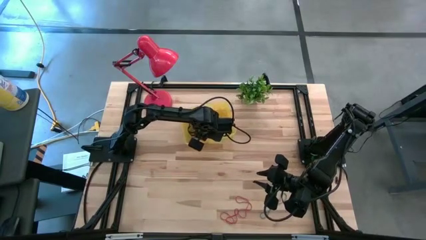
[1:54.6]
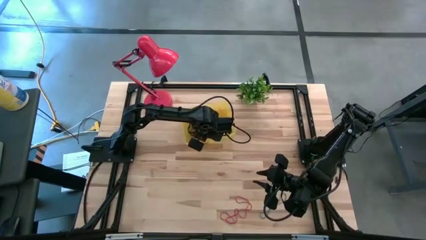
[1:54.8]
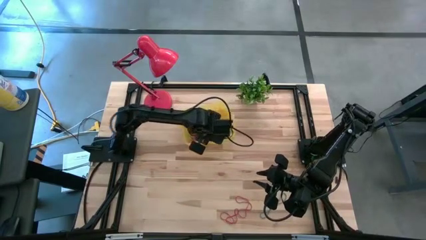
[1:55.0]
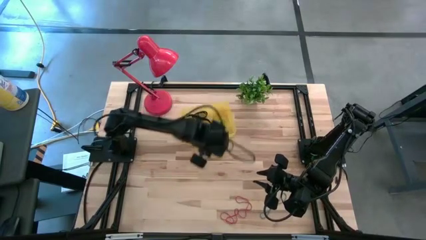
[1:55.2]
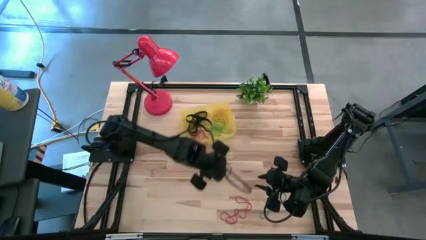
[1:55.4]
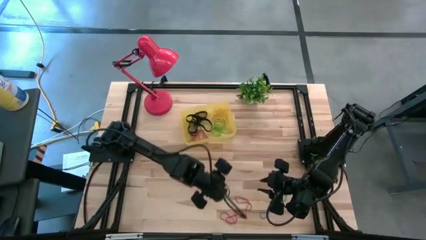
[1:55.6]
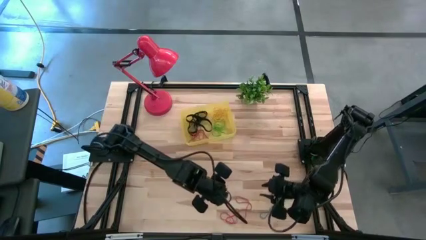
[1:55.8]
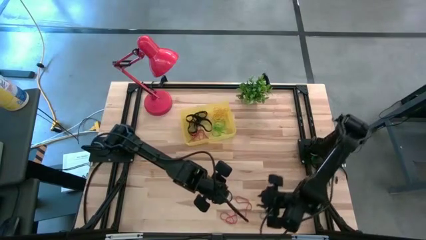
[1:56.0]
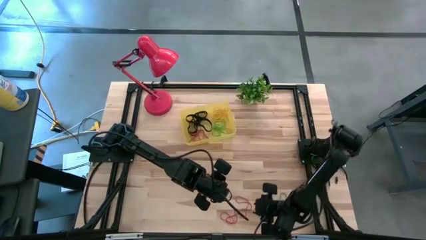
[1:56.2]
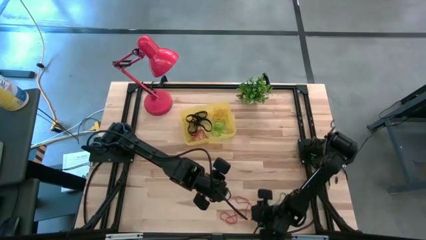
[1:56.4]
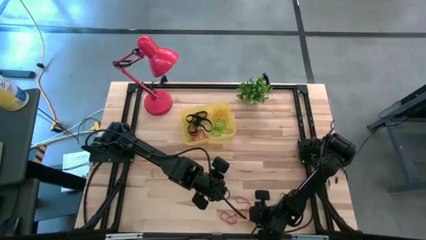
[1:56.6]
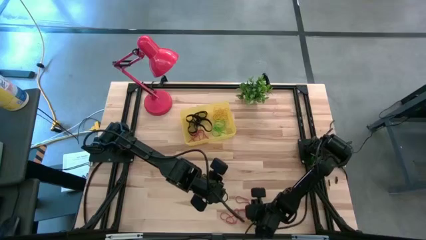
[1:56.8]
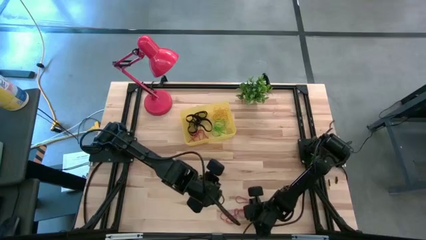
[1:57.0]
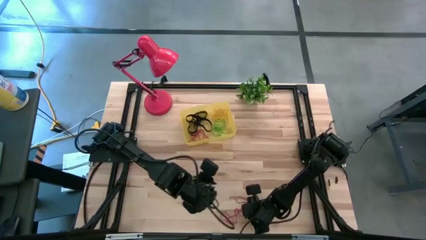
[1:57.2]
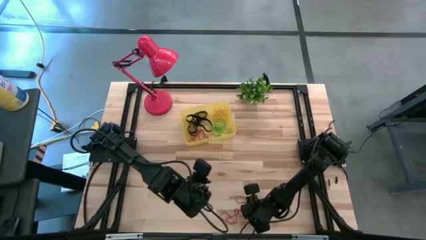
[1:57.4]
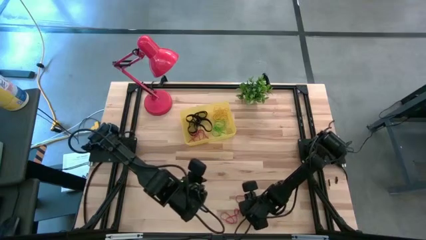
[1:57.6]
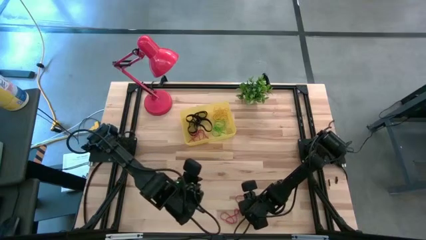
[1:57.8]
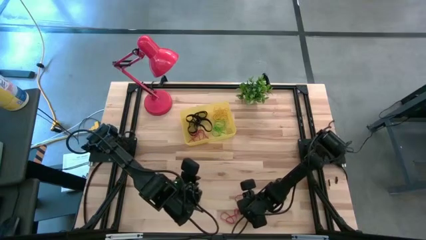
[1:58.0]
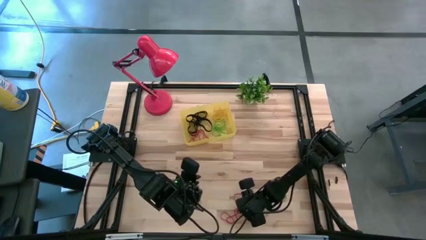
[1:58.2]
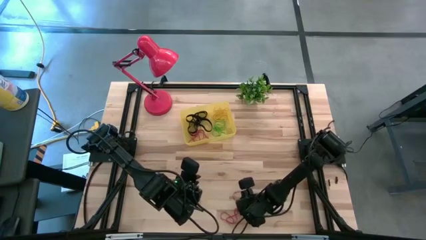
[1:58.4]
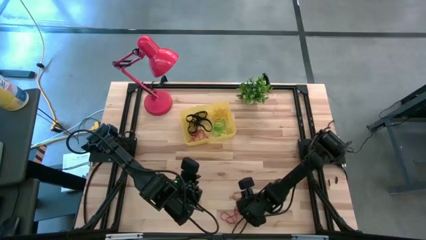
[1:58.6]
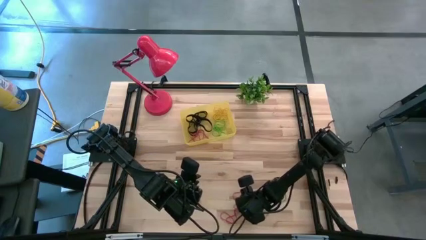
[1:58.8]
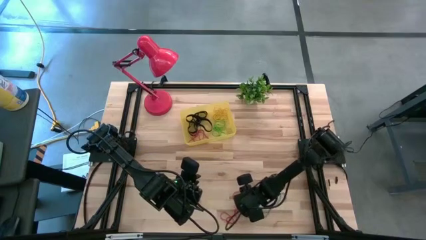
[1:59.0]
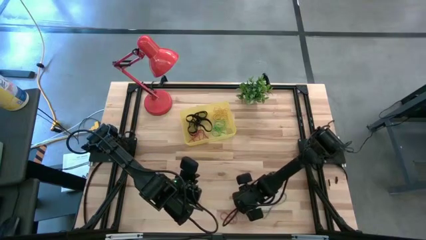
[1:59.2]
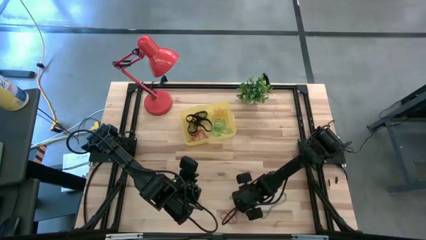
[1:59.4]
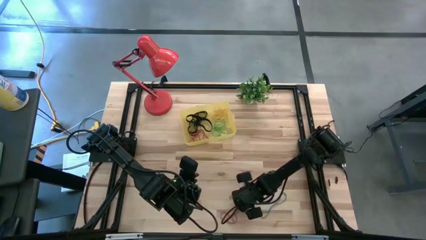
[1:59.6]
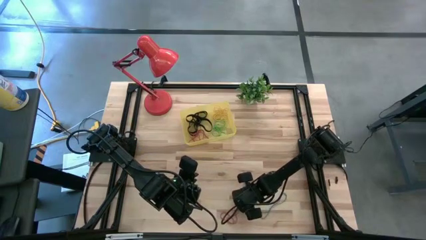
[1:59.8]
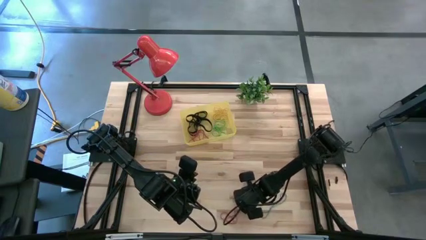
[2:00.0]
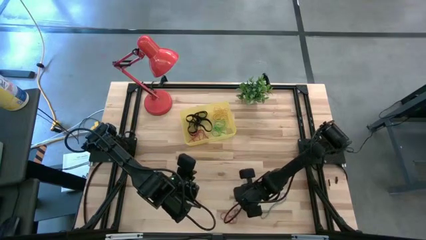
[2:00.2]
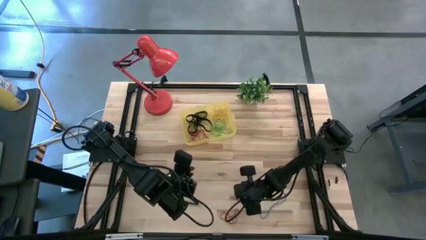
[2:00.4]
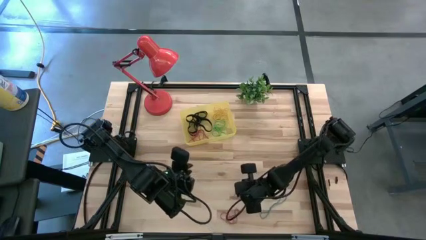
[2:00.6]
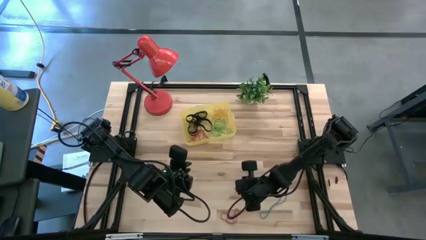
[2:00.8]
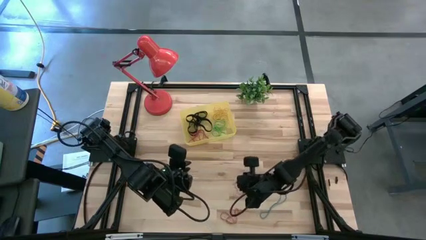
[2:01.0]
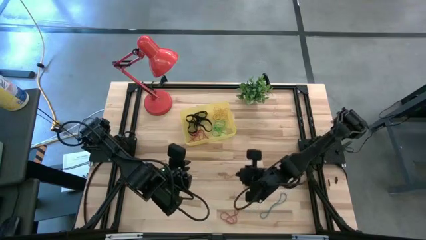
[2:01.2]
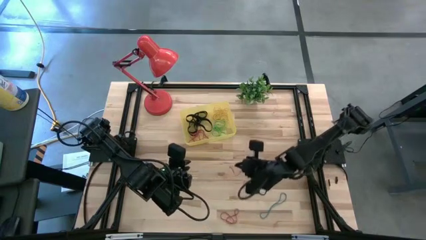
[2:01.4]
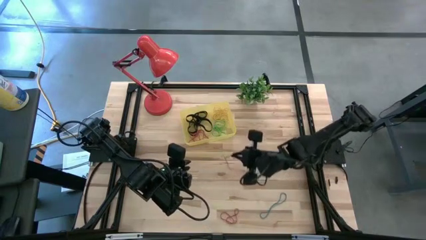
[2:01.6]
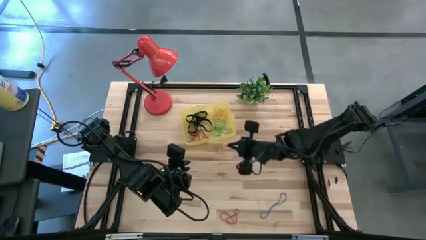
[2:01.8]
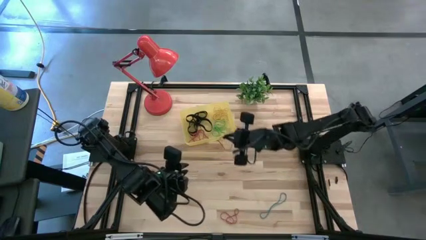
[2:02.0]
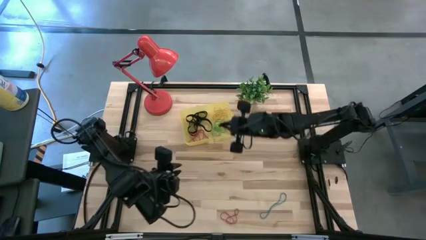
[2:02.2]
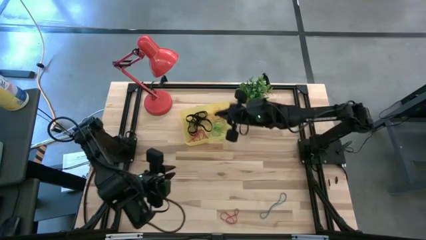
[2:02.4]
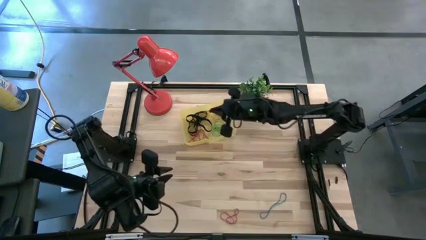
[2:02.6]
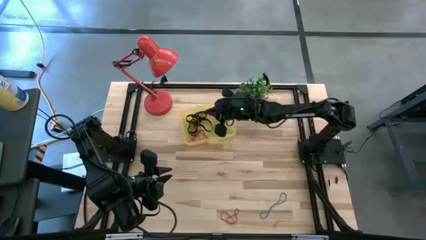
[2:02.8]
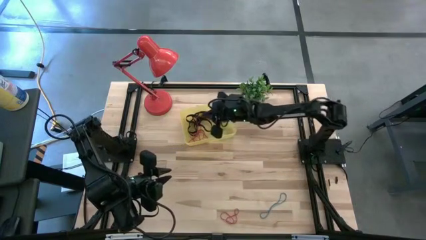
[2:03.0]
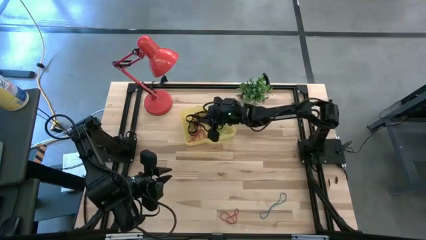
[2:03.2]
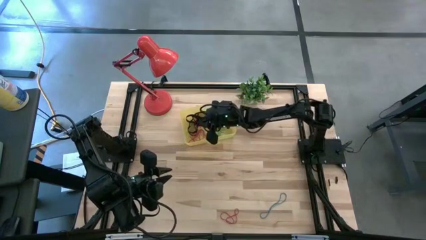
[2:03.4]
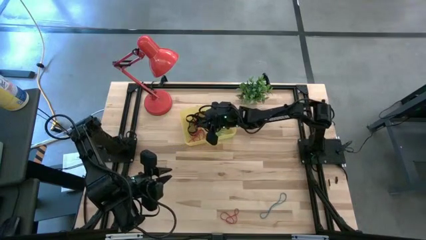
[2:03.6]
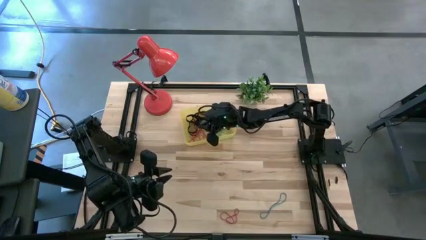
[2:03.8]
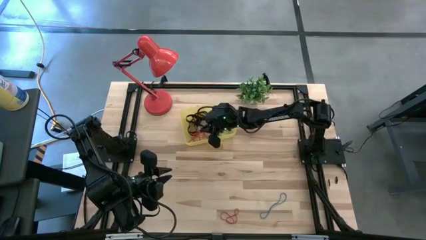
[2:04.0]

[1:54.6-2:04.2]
Task: Pick and place rubber bands into bin
Put the red rubber band into the yellow bin

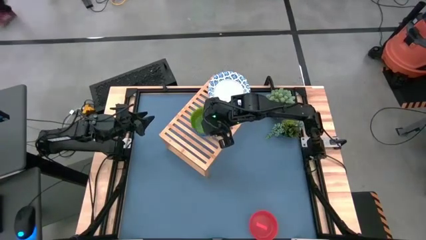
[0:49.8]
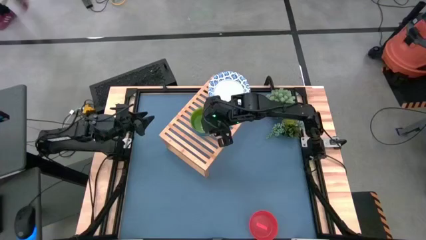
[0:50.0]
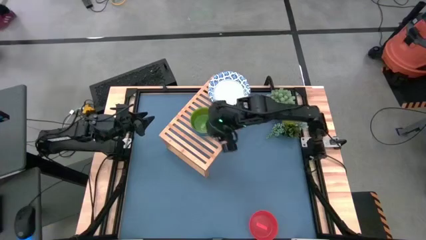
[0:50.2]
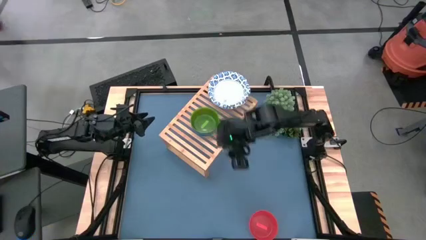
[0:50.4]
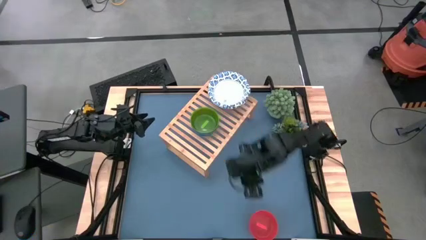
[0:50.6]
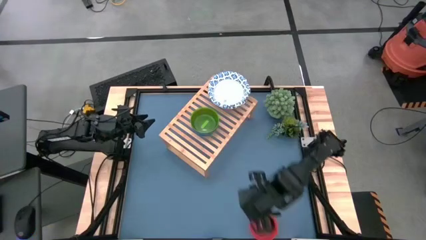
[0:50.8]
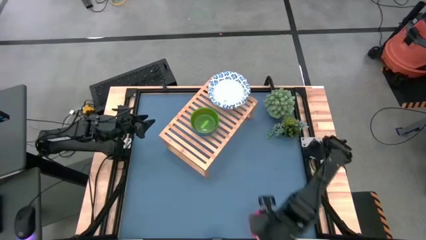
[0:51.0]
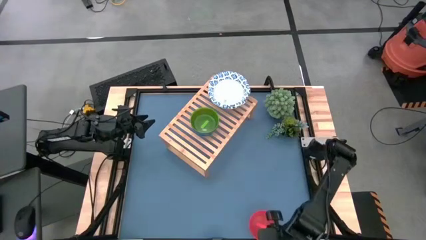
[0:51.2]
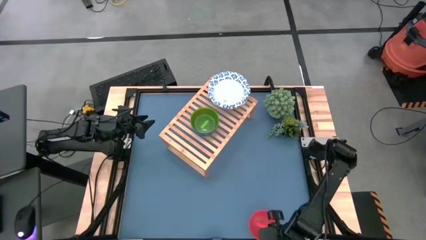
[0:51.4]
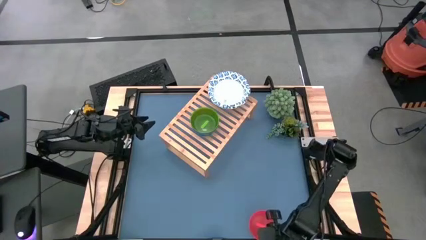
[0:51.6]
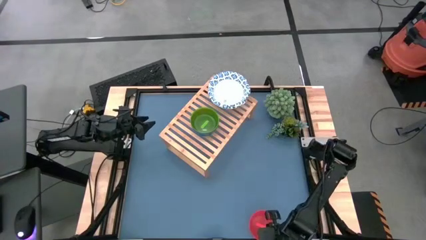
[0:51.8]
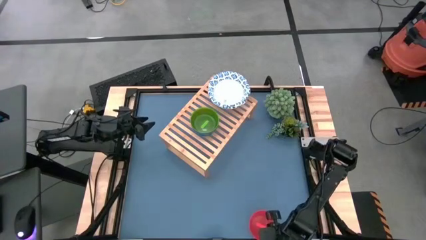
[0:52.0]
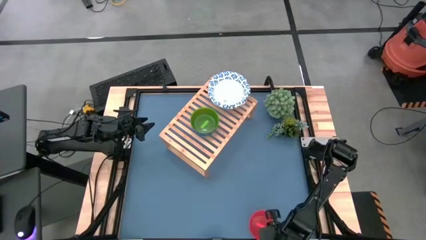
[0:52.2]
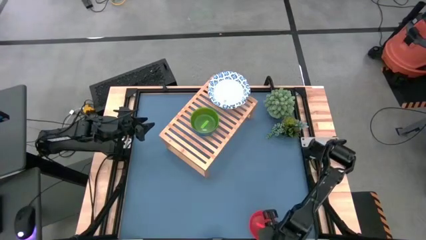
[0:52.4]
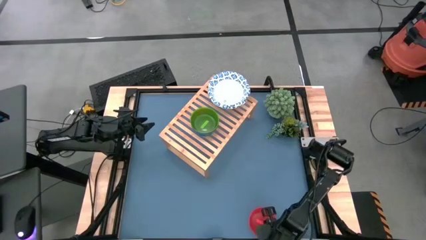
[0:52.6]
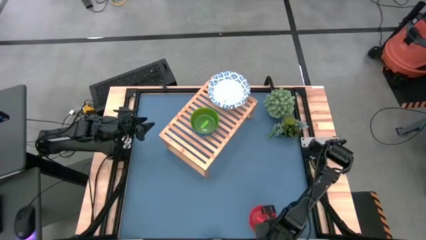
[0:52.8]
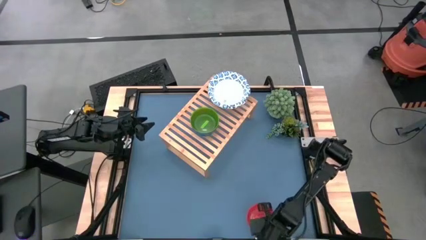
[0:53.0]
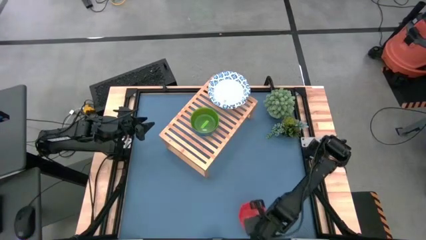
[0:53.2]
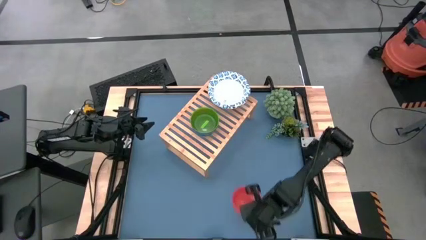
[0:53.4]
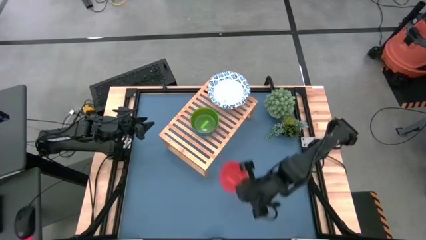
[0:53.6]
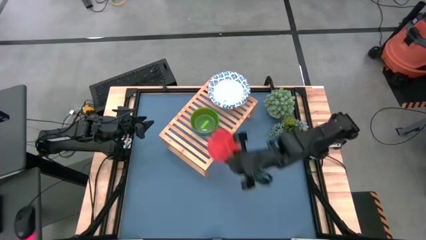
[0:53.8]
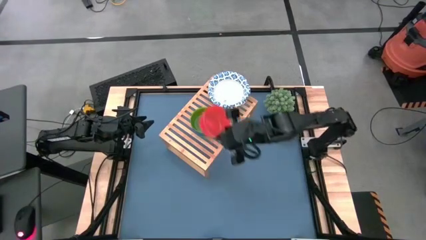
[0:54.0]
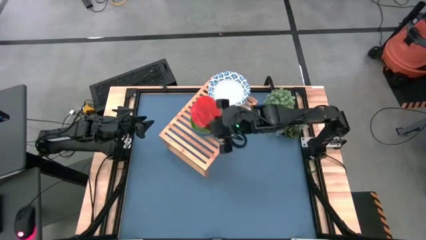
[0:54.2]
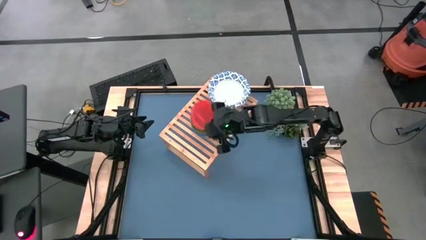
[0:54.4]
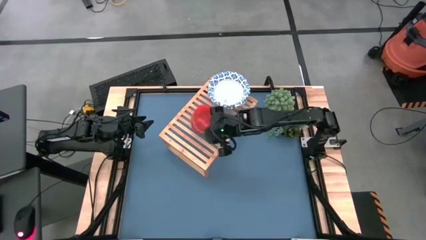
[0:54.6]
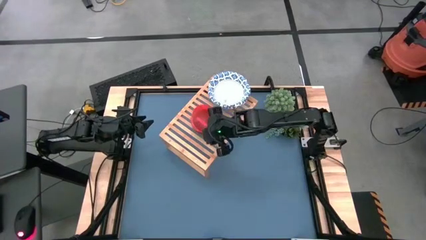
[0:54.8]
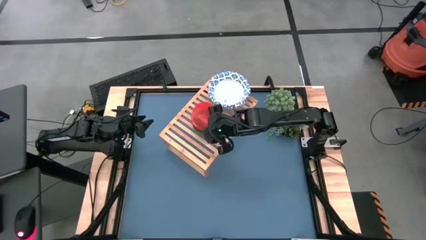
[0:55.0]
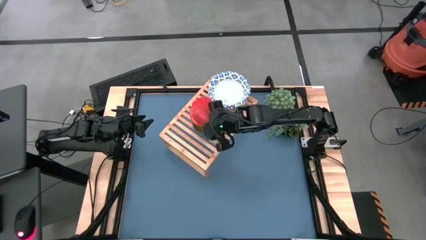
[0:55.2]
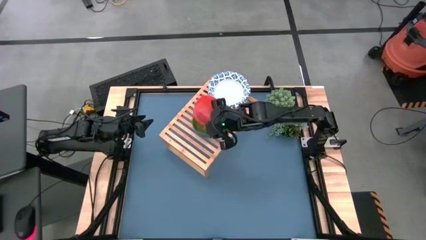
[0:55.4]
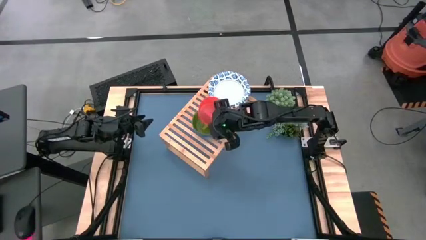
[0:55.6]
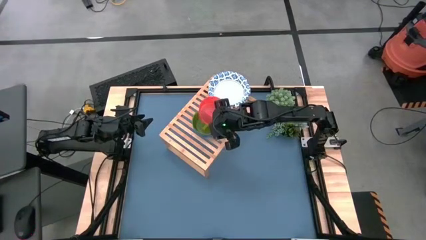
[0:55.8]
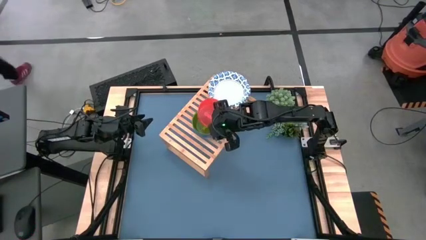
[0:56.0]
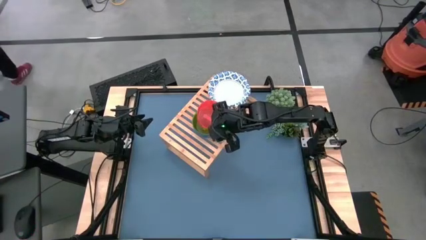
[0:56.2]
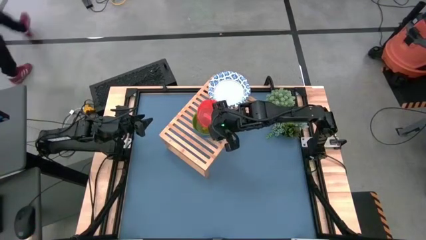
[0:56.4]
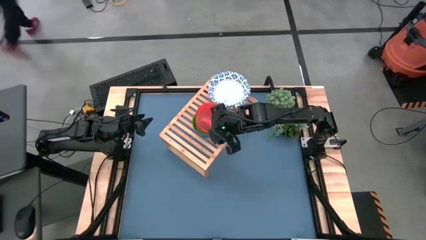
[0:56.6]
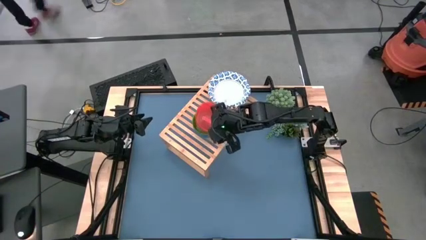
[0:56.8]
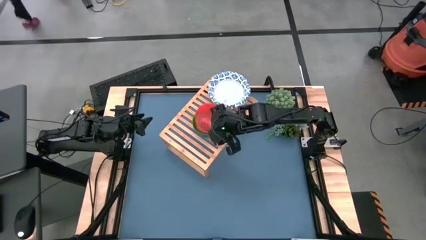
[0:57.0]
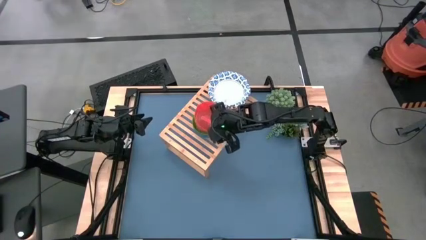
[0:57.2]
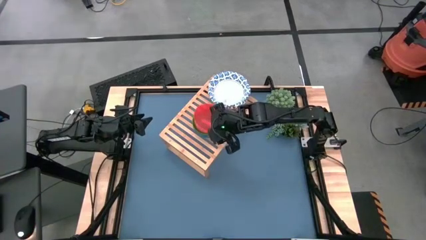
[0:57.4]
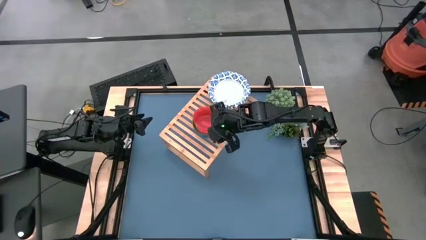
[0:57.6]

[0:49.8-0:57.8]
Task: Place and stack bowls onto a shelf
Stack the orange bowl on top of the green bowl on the shelf
